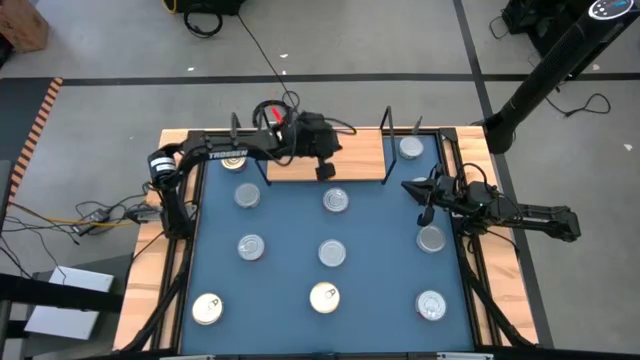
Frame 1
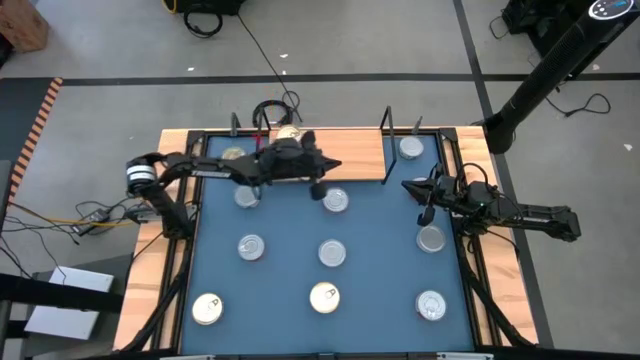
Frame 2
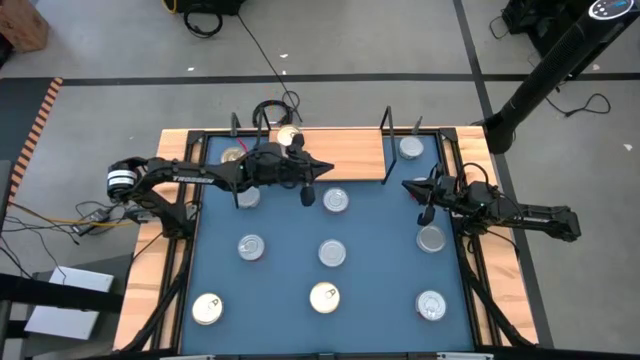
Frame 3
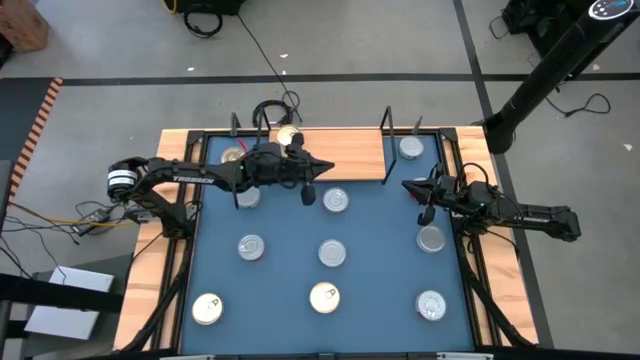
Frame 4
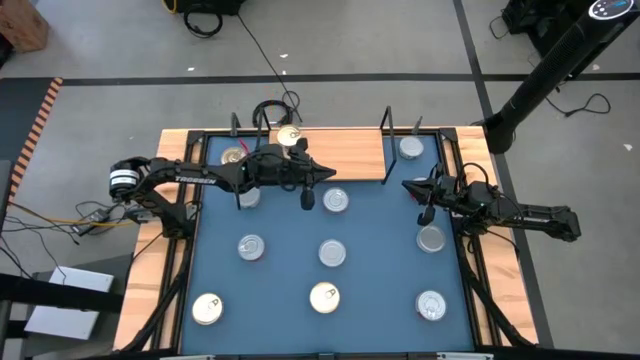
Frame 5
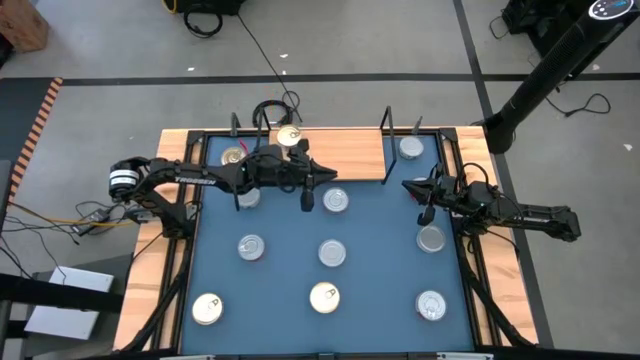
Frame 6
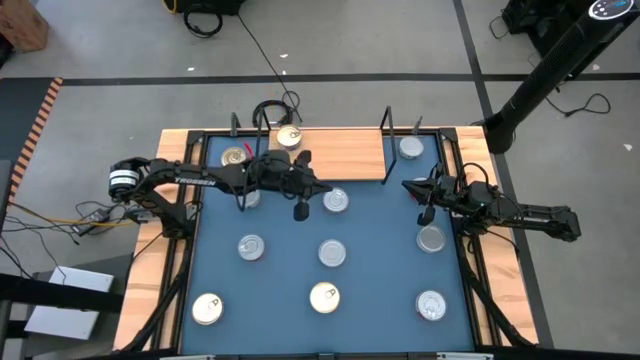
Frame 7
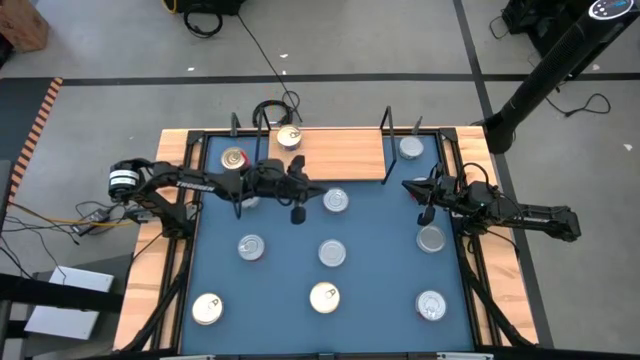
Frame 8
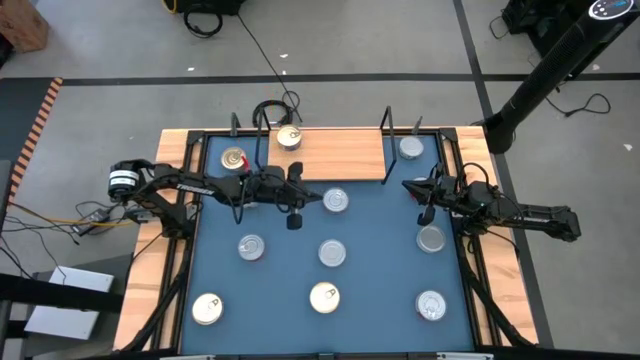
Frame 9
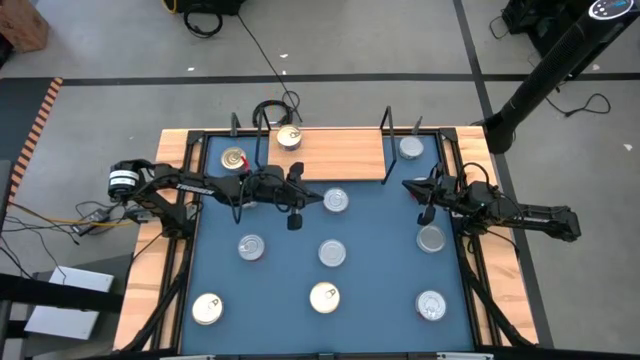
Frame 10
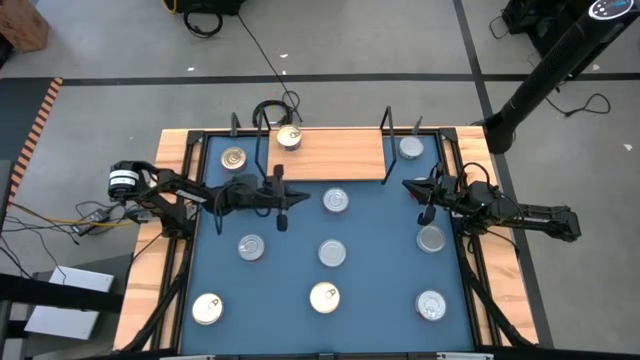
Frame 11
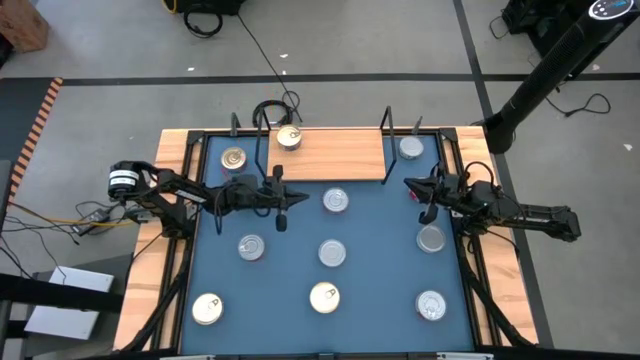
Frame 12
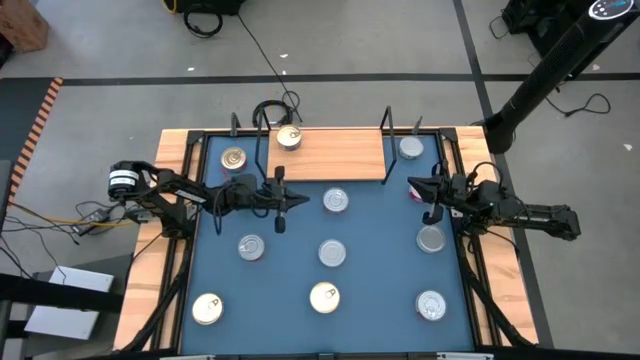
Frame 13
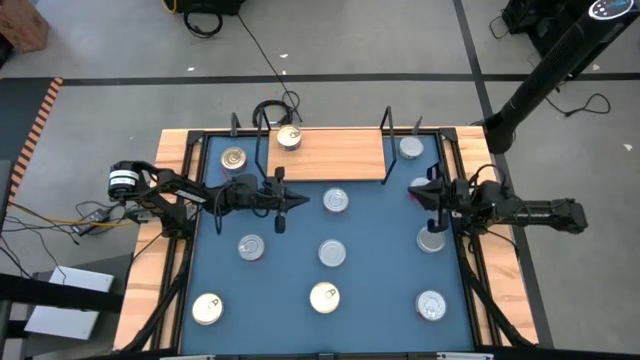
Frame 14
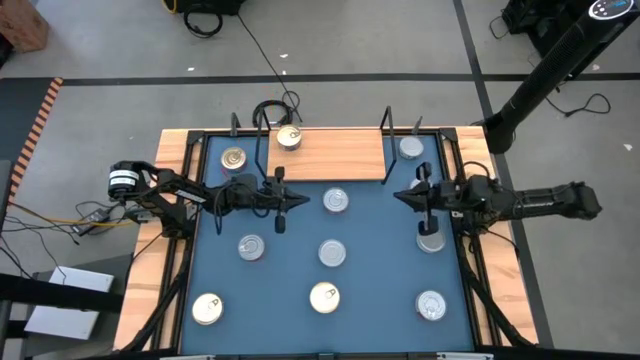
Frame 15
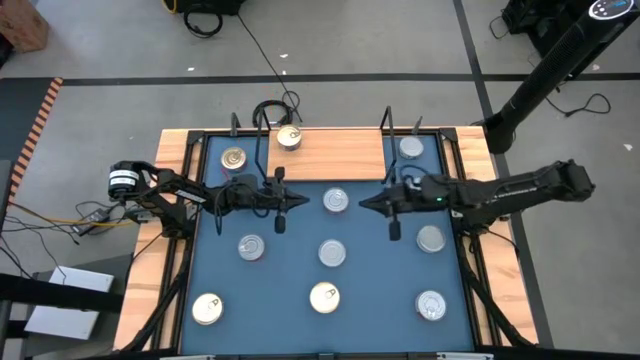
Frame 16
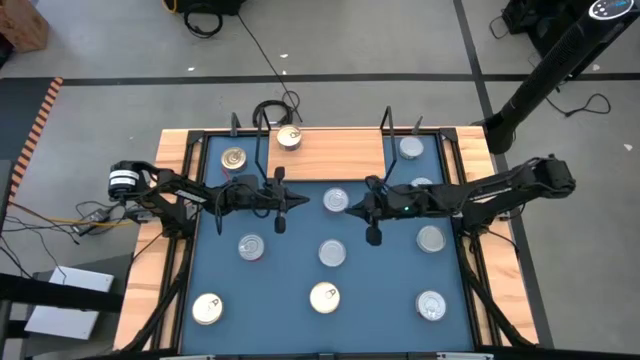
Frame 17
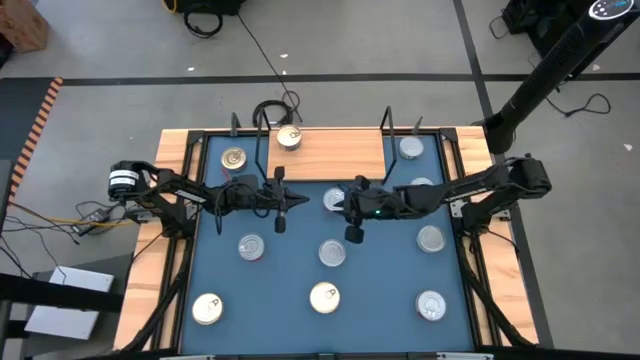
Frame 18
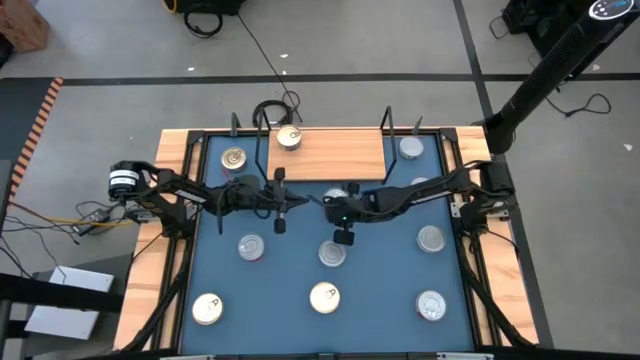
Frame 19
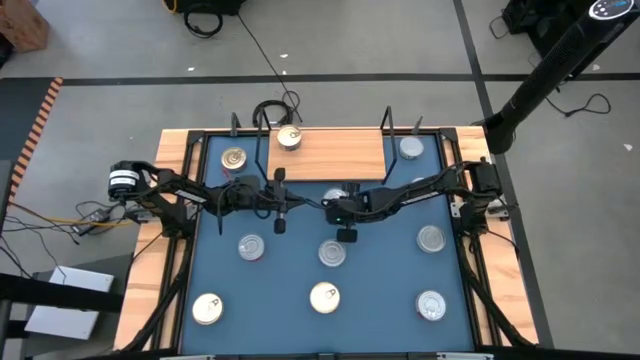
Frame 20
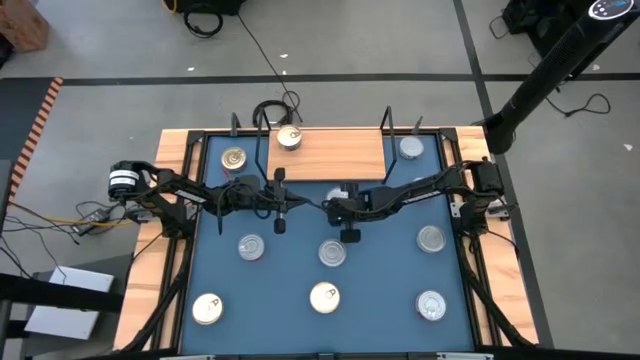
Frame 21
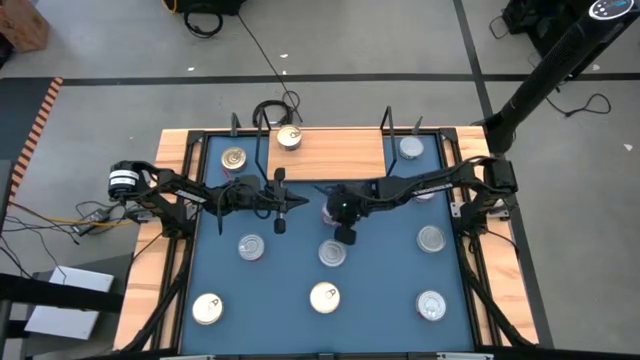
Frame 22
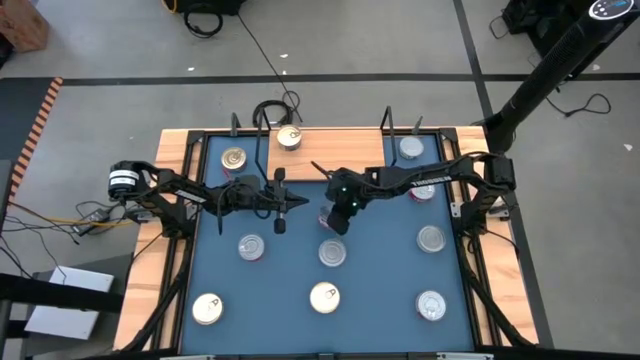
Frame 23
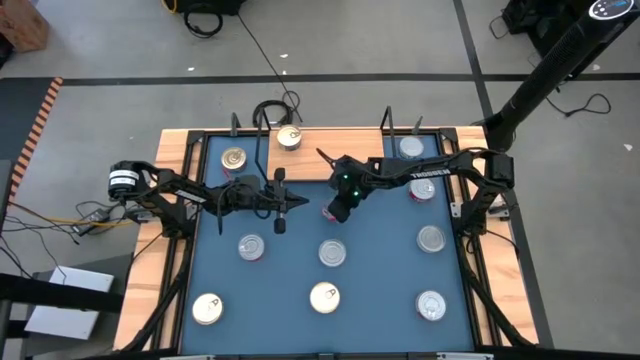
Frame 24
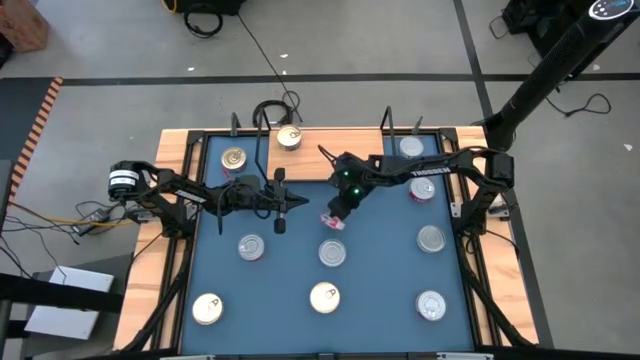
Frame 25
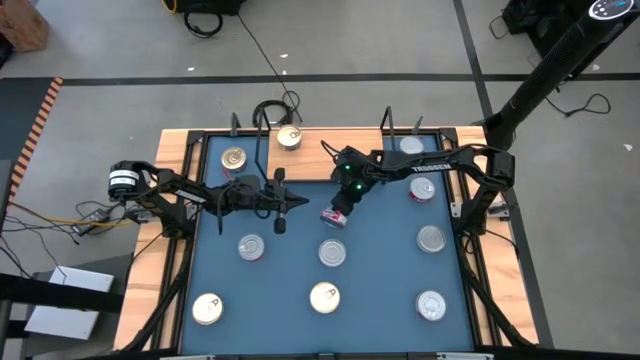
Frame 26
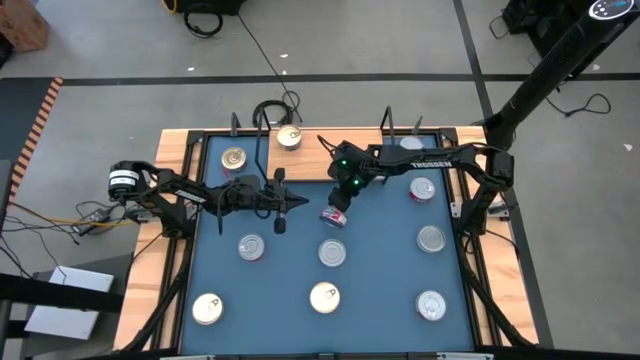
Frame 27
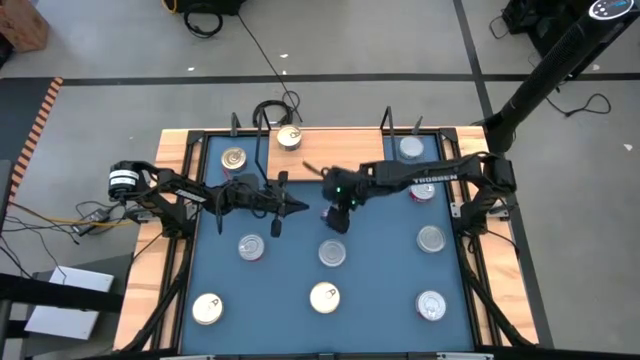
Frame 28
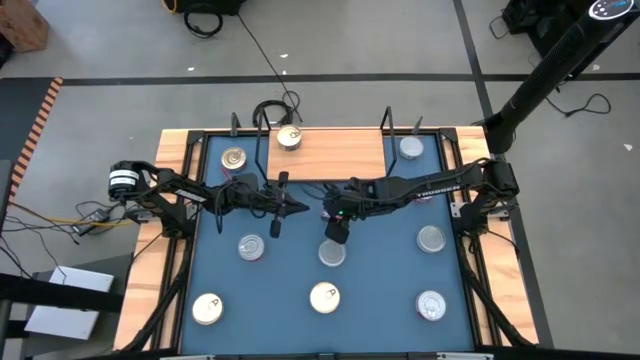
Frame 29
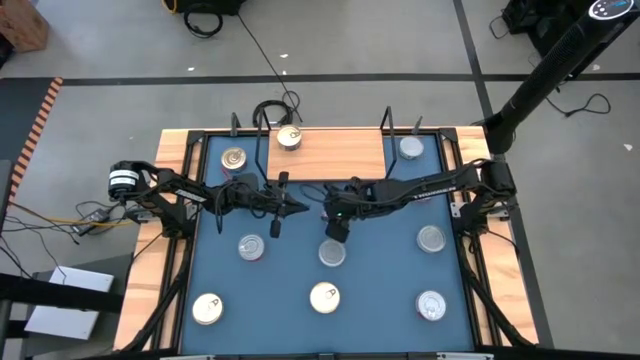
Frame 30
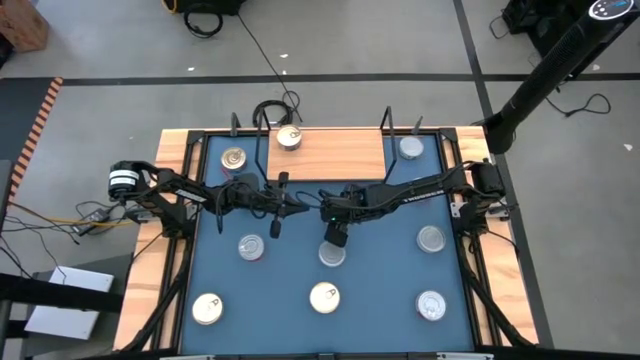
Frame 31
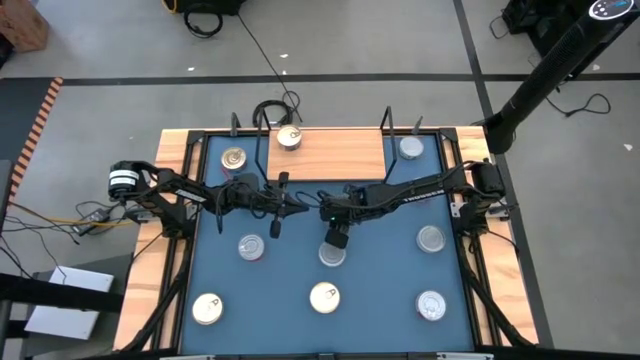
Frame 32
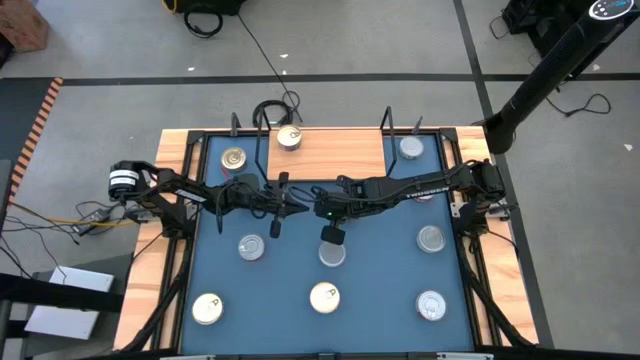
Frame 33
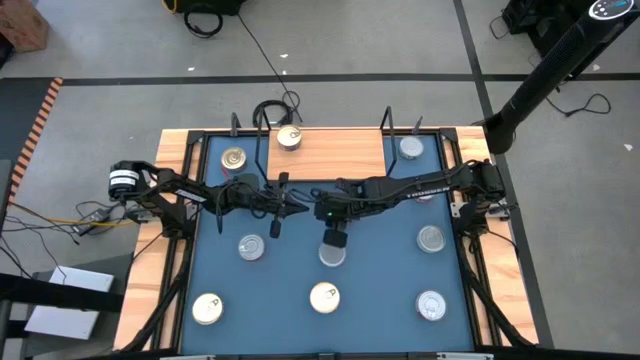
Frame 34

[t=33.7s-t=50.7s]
Task: Stack canned seafood by type on shelf
Put the top left red tuna can on the shelf
